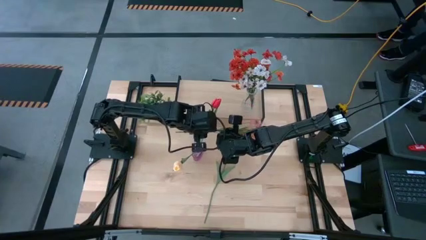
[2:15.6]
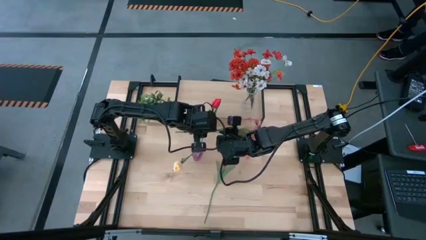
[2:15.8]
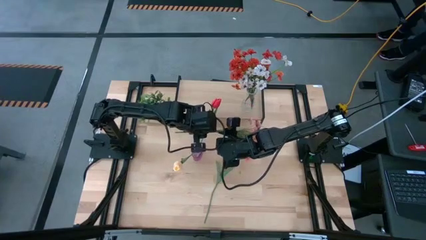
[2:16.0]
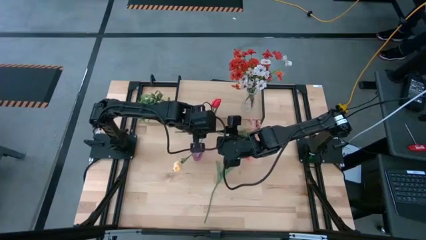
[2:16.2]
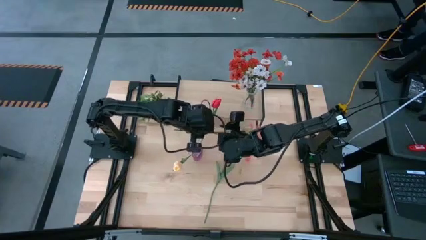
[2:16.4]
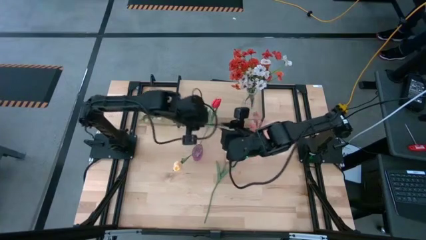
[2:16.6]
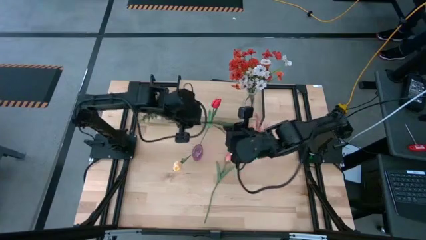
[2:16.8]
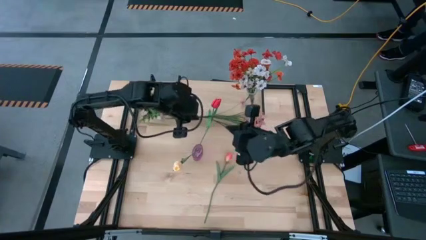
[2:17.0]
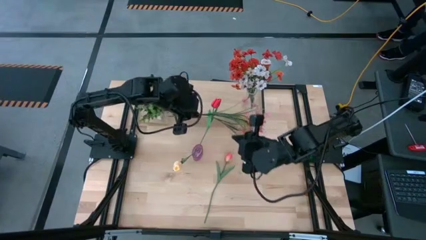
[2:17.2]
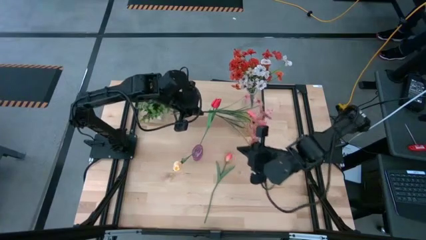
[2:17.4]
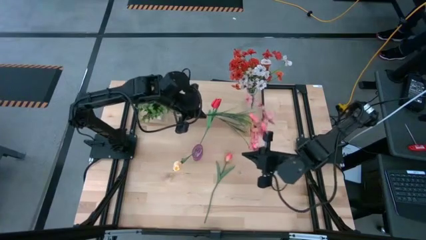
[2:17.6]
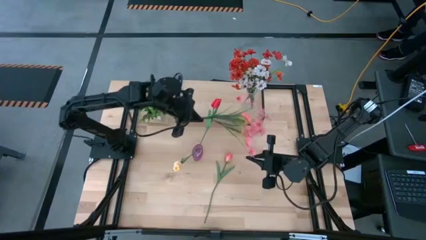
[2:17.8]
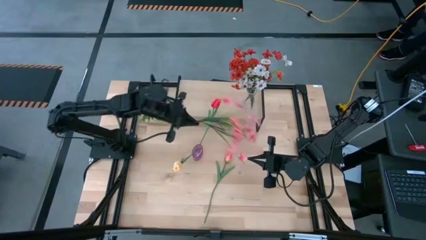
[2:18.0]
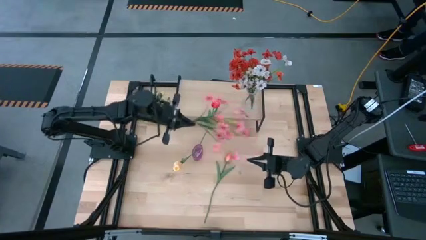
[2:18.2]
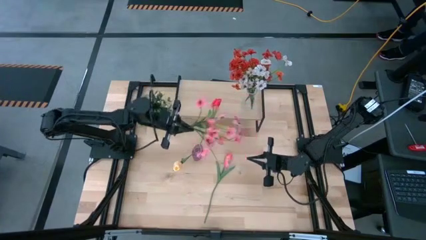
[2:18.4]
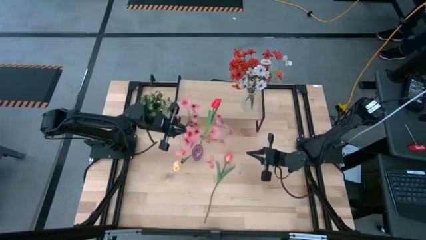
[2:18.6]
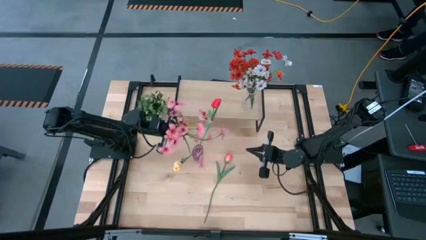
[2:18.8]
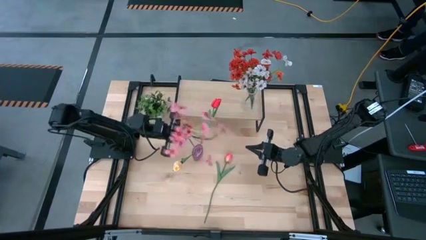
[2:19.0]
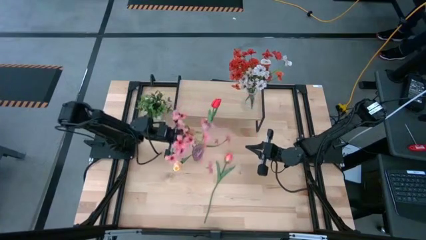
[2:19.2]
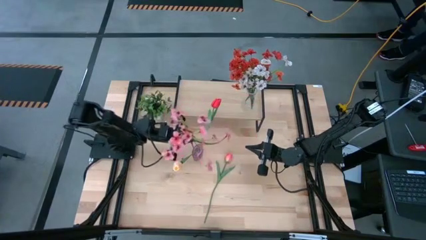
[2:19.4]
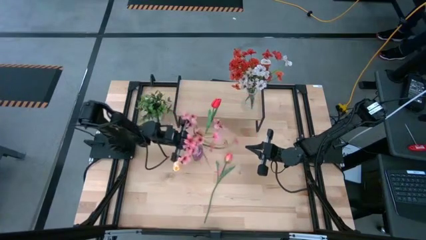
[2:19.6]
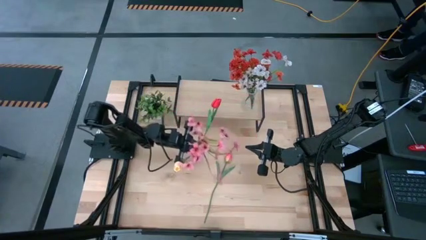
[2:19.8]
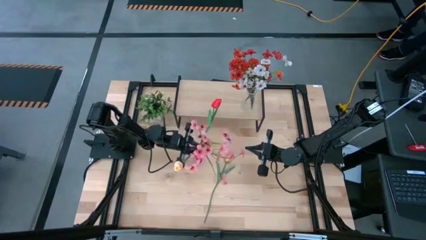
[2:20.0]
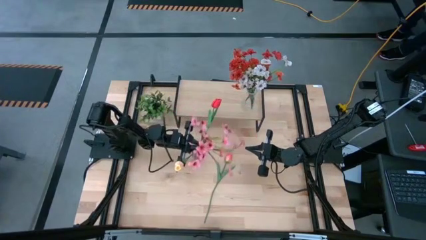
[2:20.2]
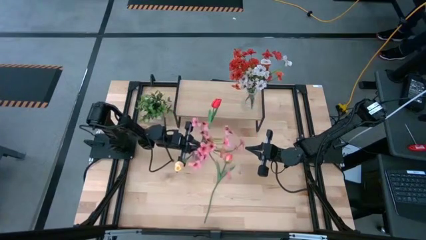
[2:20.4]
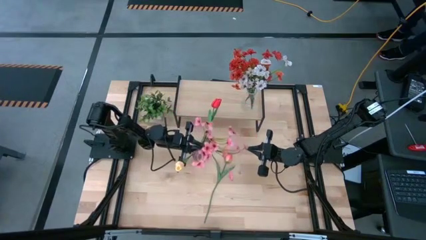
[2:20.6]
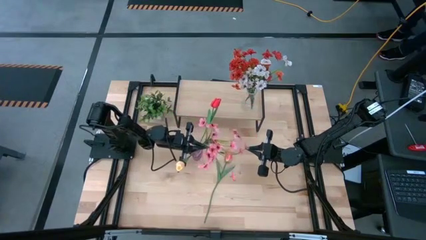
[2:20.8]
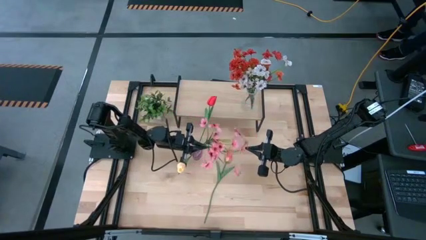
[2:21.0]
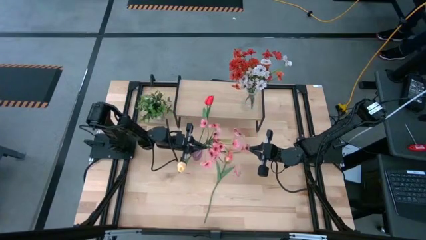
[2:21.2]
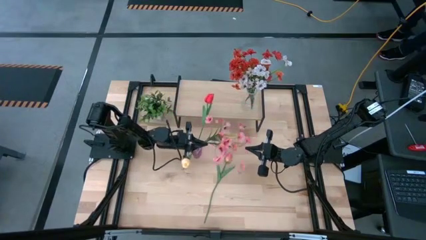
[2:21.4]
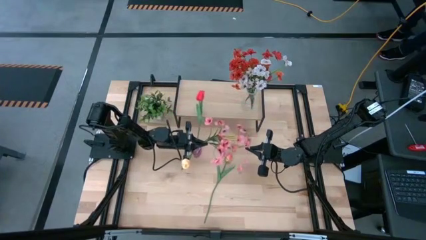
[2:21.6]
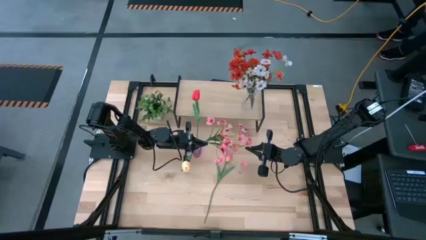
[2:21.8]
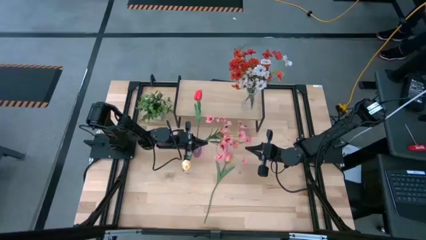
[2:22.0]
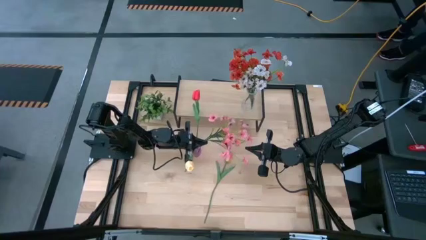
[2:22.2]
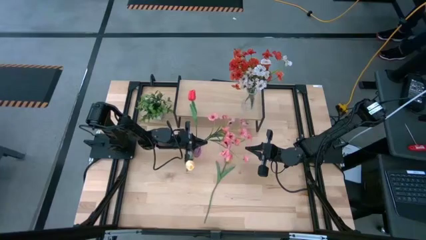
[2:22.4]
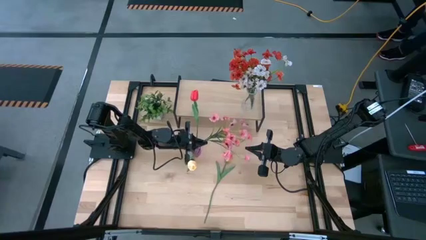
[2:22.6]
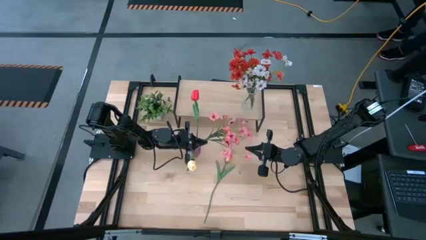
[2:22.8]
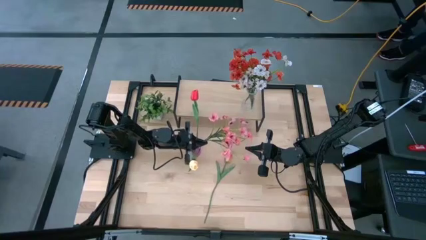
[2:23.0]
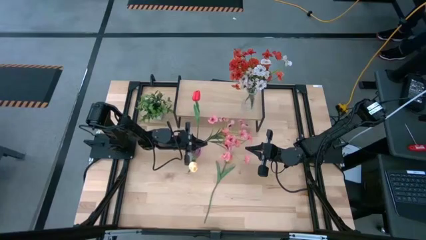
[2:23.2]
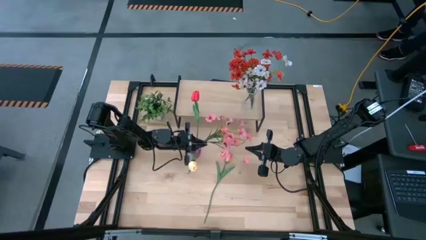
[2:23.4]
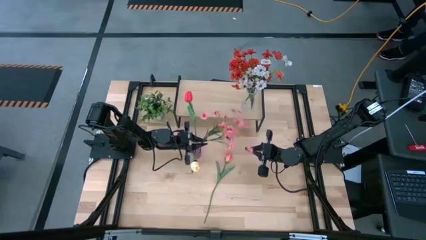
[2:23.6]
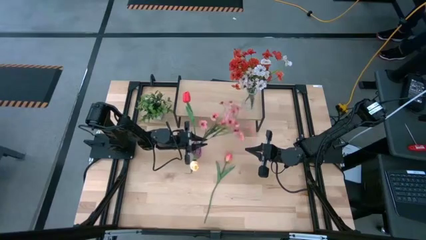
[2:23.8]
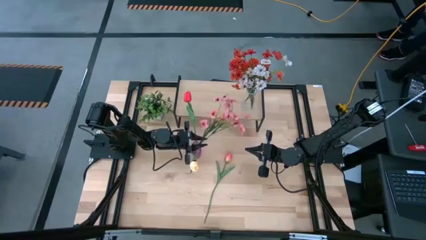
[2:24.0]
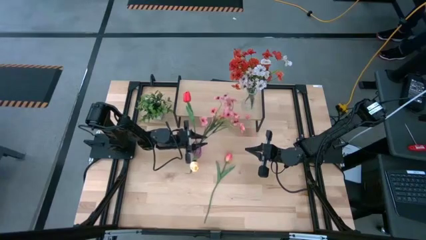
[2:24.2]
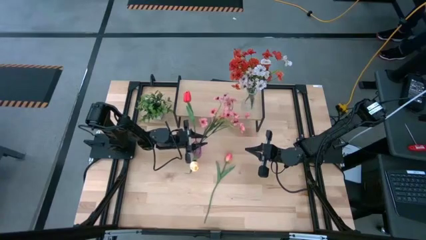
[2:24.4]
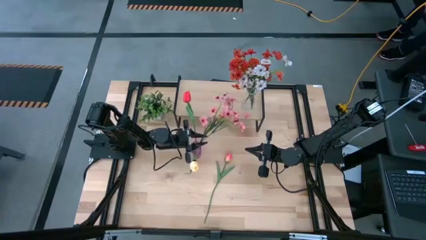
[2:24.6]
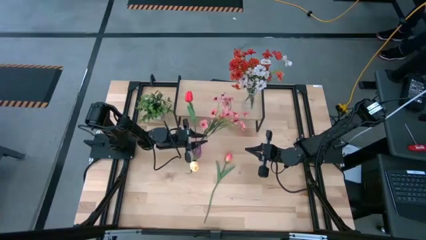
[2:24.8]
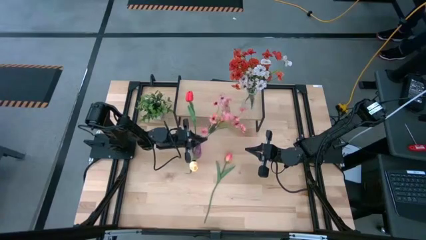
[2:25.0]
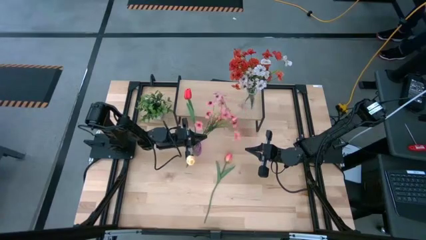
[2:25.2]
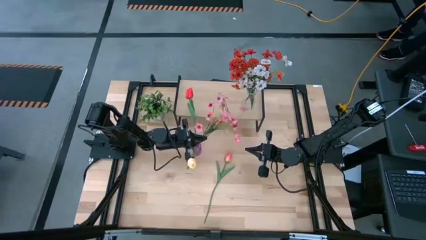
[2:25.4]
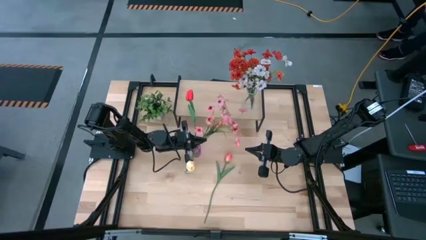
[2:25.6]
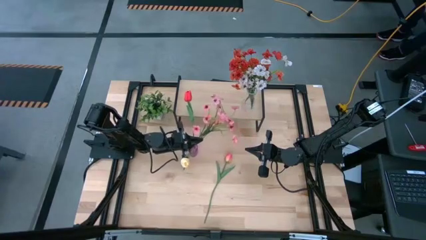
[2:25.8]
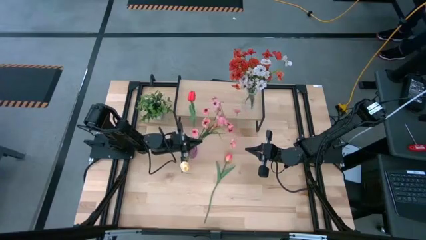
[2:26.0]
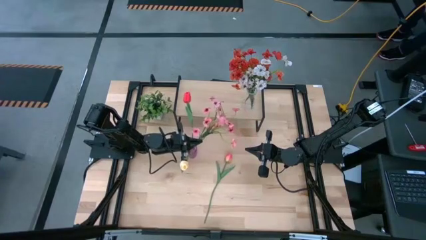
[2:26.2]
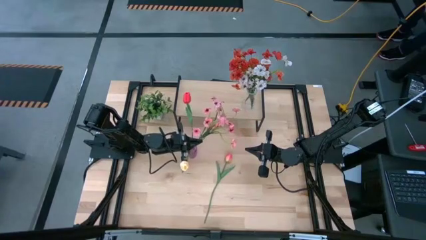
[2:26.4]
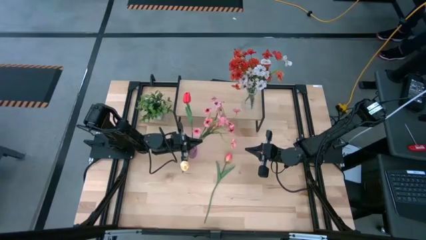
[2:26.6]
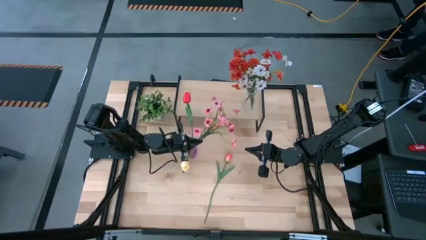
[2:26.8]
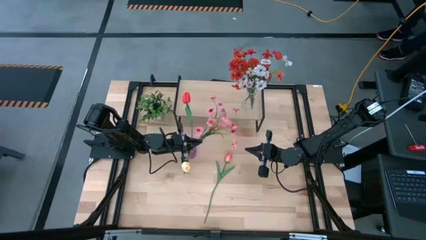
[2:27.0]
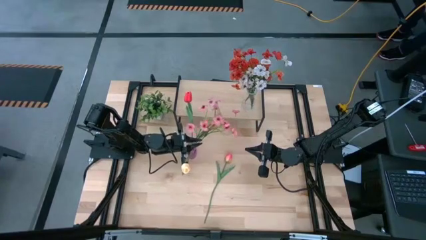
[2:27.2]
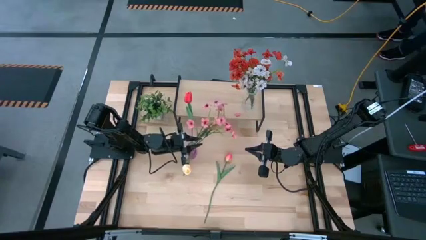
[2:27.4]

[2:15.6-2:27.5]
Task: Pick and place flowers into a vace then onto a shelf
Put the pink flowers into the purple vase

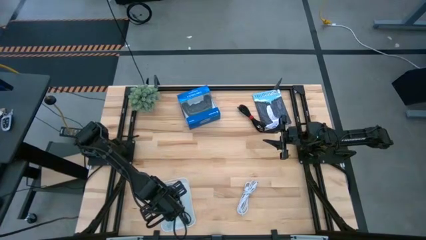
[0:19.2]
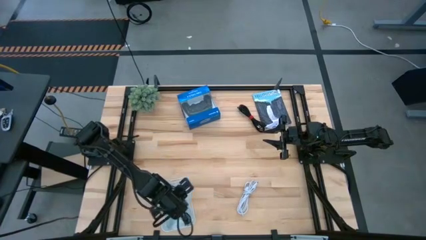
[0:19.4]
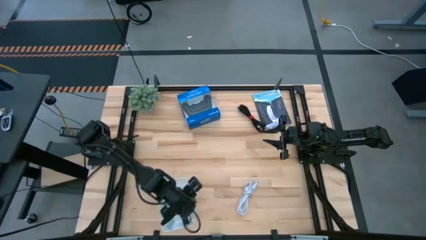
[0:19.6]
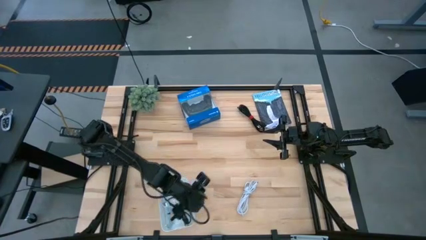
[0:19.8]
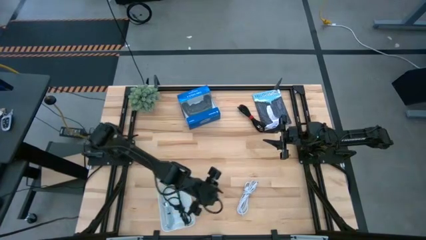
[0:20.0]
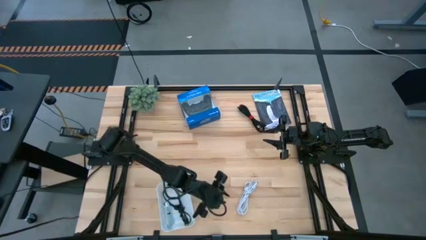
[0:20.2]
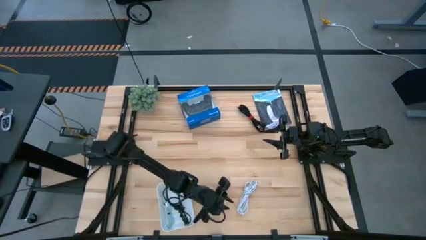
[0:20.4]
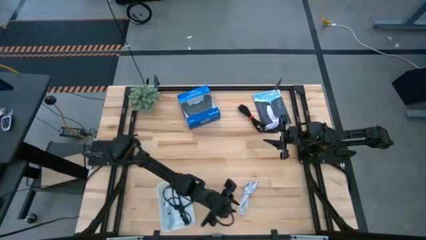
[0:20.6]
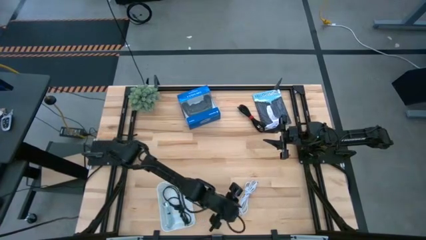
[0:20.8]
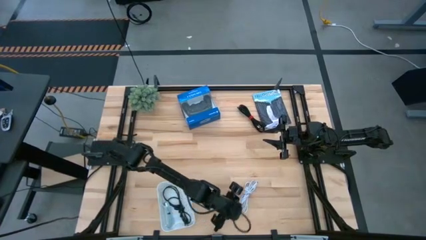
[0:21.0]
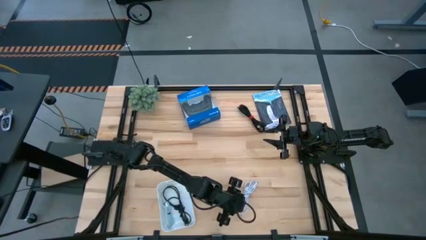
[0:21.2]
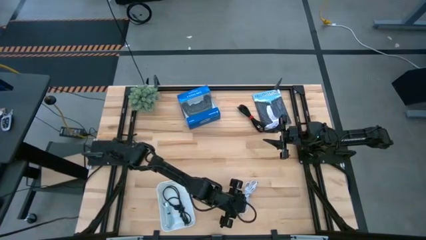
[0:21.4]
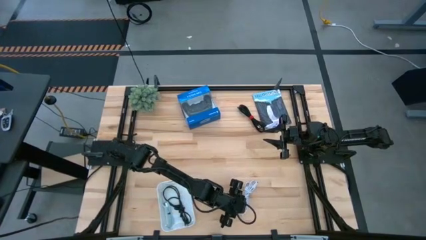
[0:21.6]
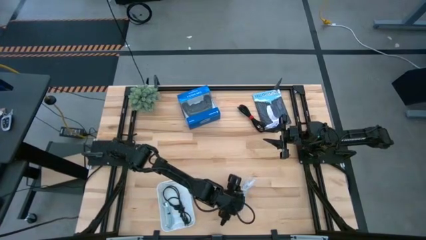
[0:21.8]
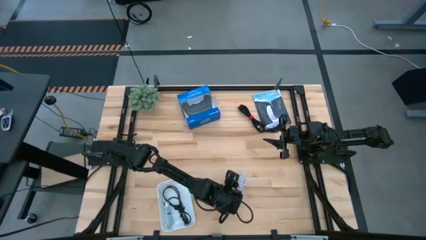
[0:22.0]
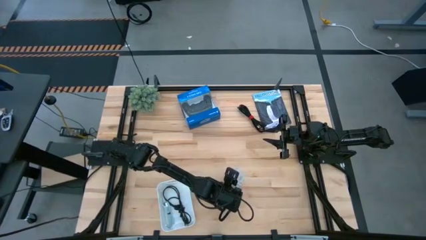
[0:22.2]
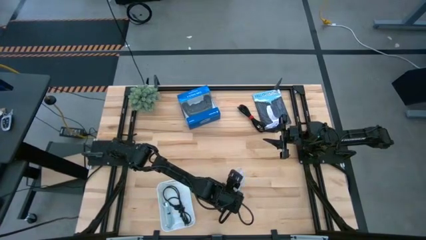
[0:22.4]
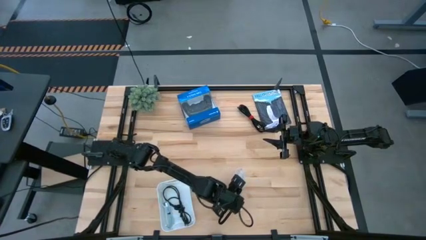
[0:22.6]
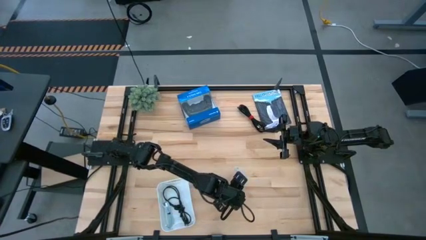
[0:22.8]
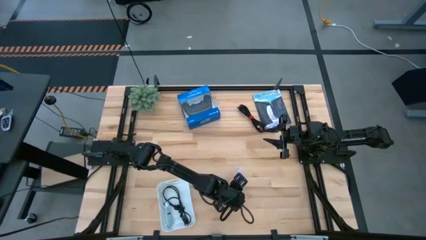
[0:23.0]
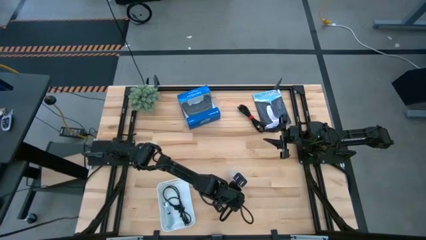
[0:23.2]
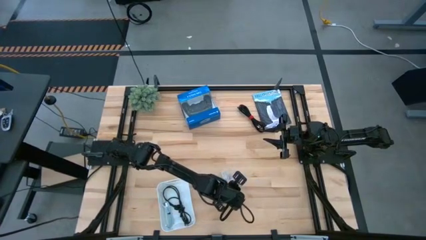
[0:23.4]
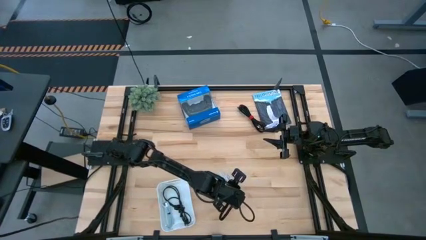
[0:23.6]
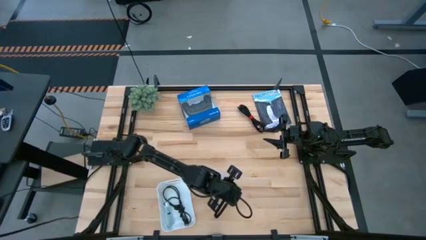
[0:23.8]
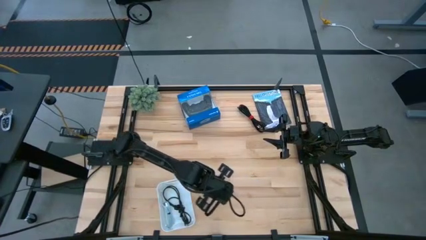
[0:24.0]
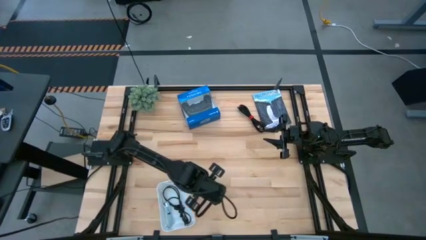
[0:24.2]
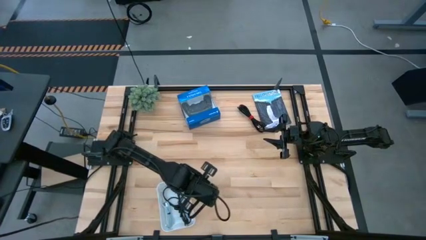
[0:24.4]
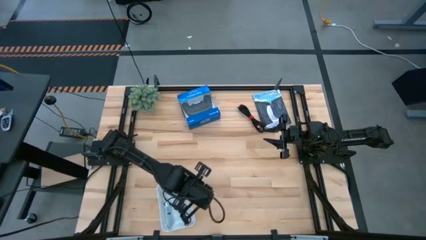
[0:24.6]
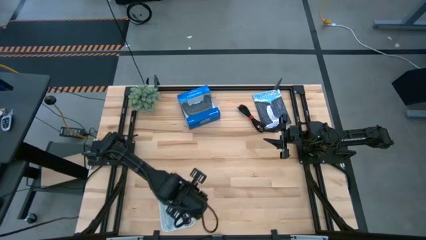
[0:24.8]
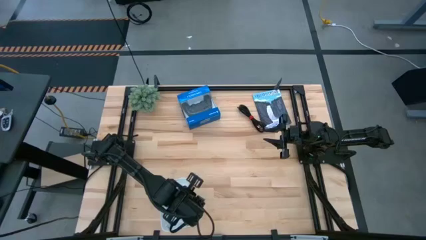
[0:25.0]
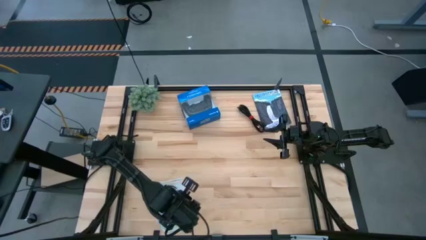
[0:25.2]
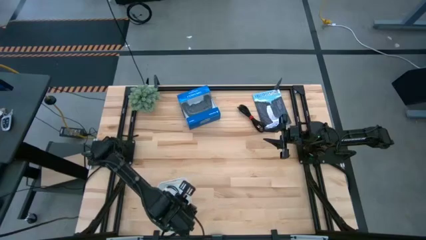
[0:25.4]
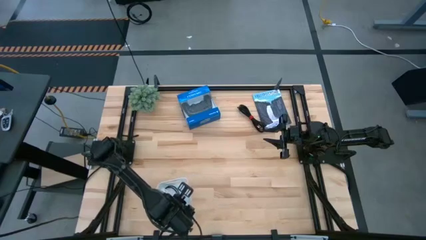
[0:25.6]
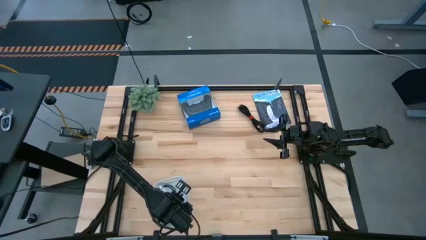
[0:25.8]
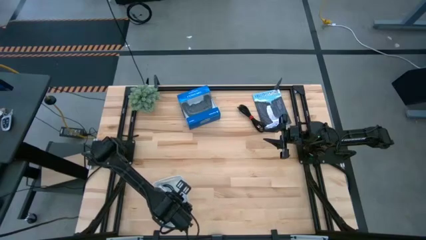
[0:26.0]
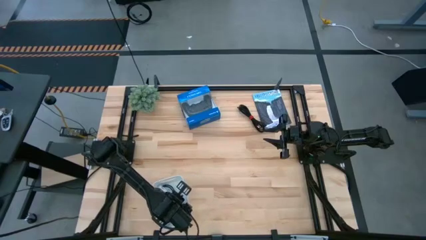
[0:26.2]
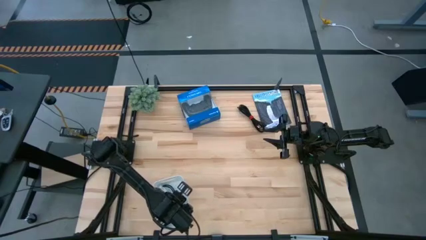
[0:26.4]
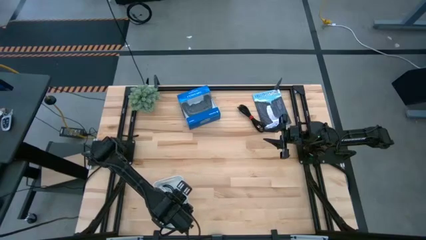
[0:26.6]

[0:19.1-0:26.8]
Task: Pick and place USB-C Cables
Put the white charger cable into the white bin
